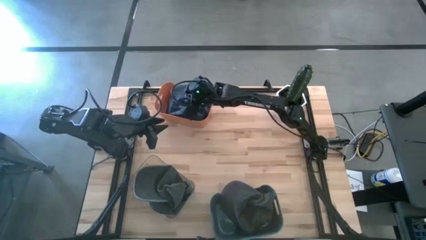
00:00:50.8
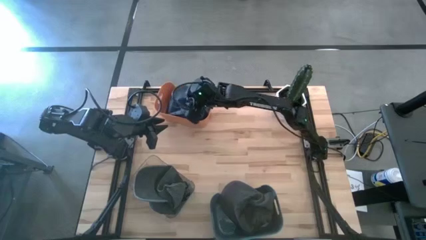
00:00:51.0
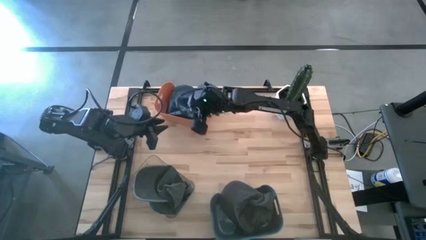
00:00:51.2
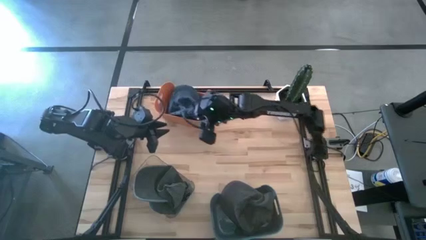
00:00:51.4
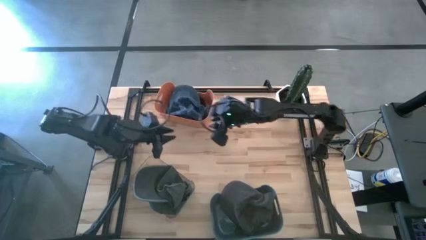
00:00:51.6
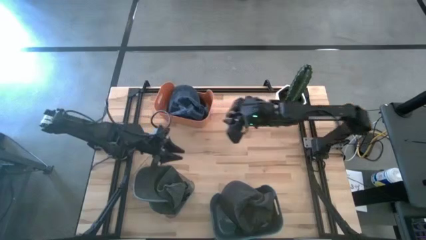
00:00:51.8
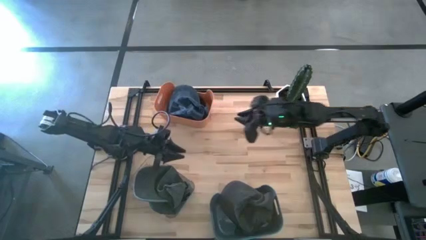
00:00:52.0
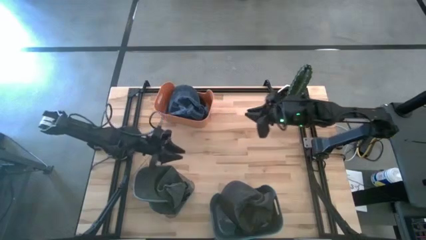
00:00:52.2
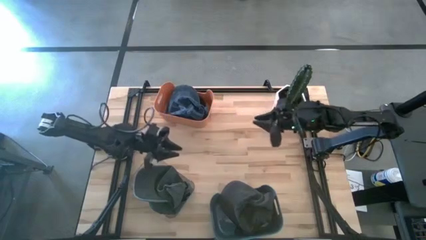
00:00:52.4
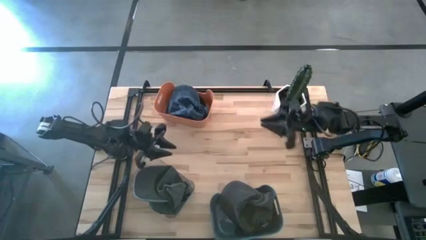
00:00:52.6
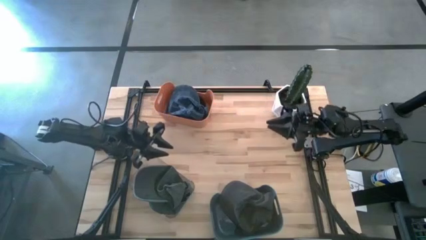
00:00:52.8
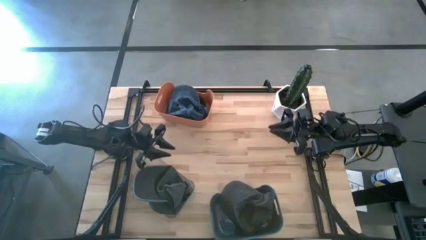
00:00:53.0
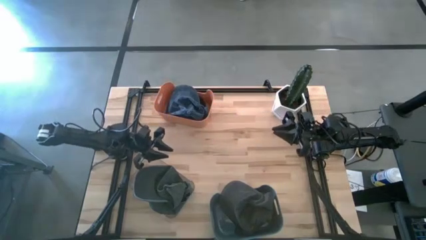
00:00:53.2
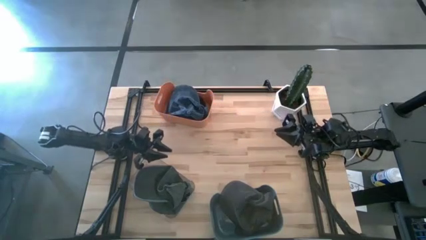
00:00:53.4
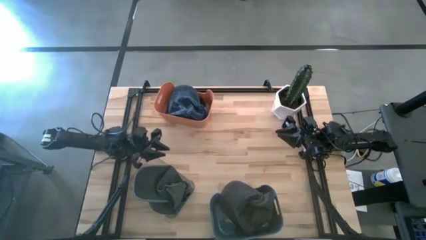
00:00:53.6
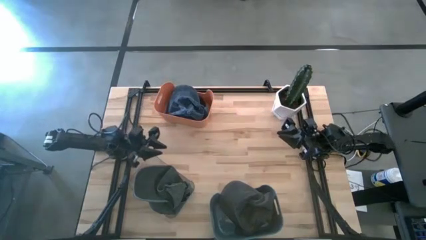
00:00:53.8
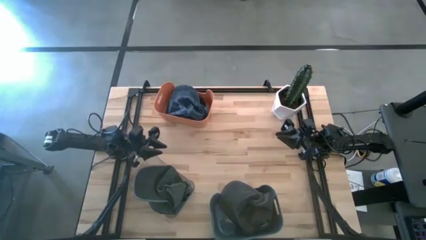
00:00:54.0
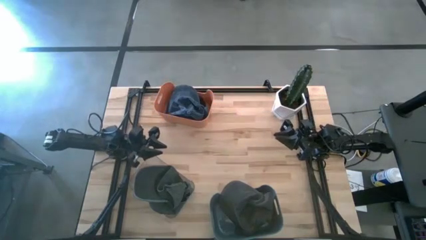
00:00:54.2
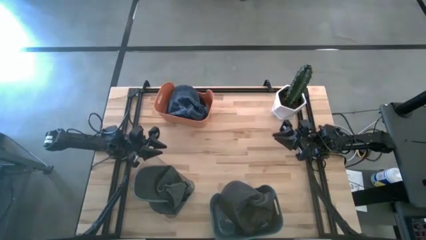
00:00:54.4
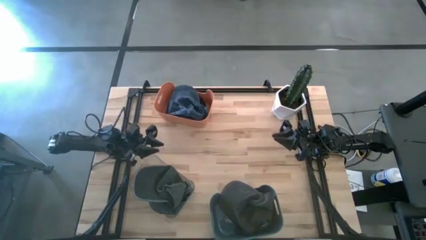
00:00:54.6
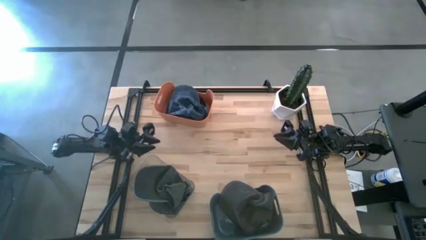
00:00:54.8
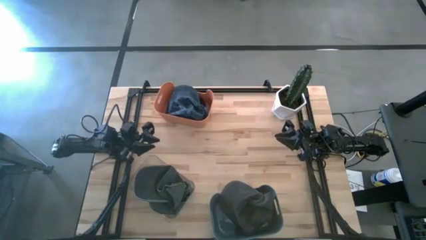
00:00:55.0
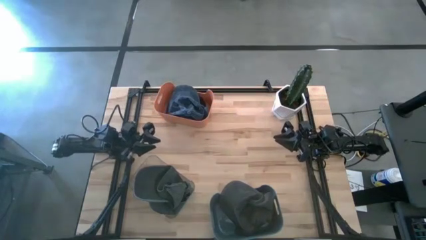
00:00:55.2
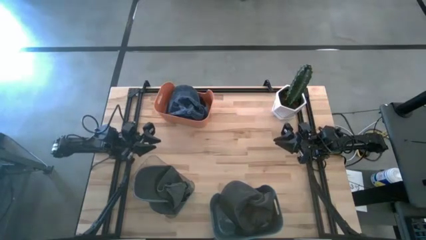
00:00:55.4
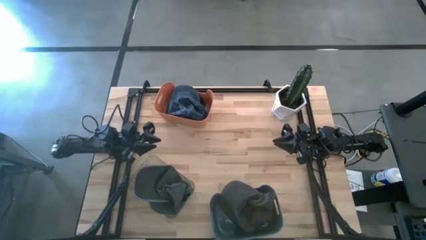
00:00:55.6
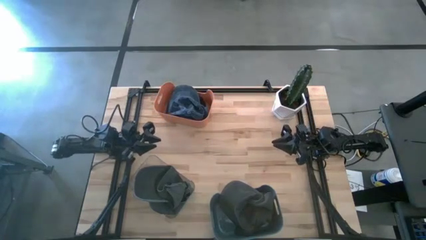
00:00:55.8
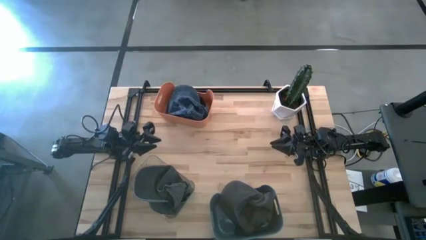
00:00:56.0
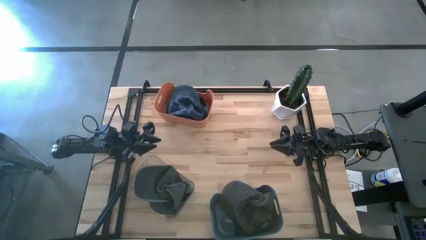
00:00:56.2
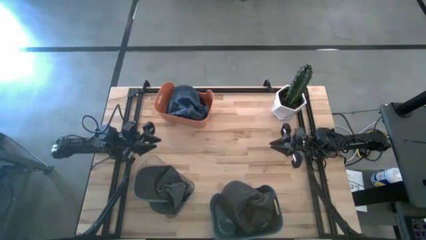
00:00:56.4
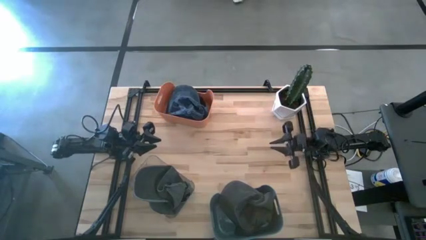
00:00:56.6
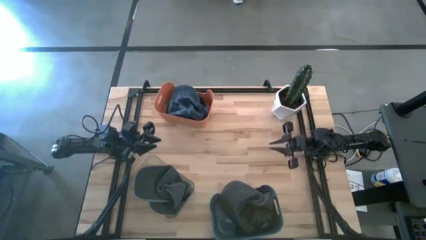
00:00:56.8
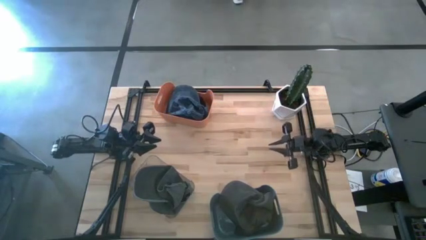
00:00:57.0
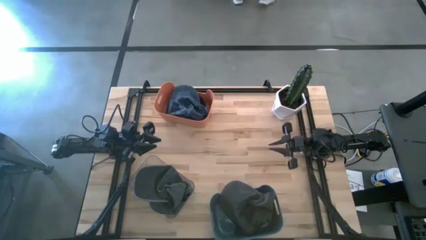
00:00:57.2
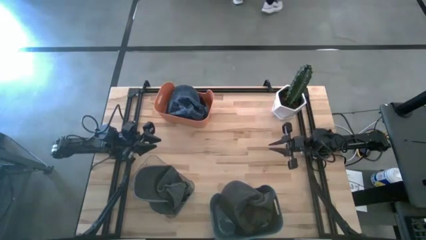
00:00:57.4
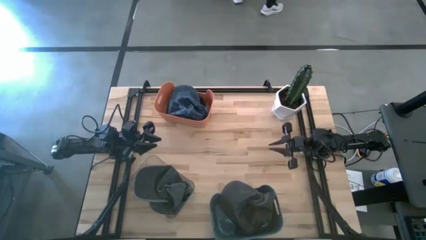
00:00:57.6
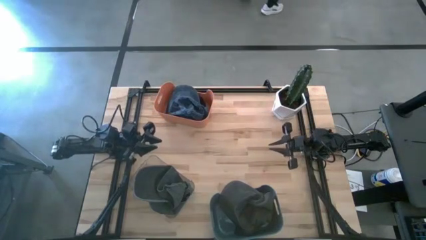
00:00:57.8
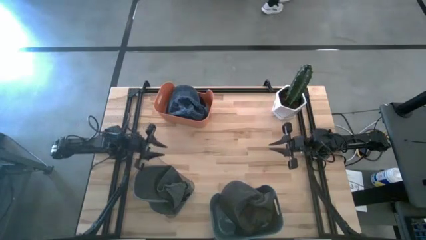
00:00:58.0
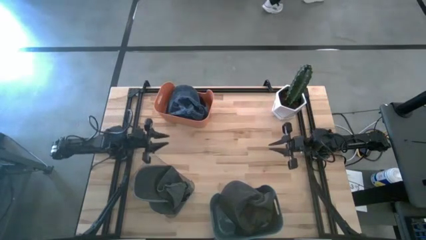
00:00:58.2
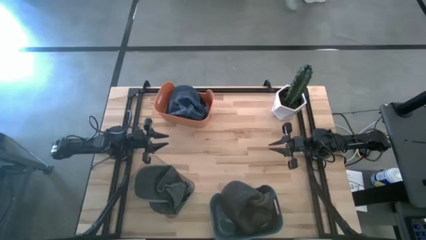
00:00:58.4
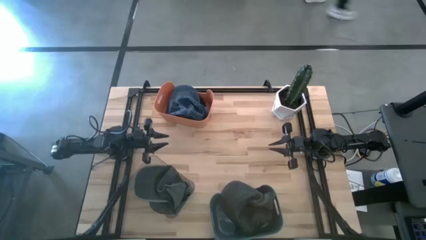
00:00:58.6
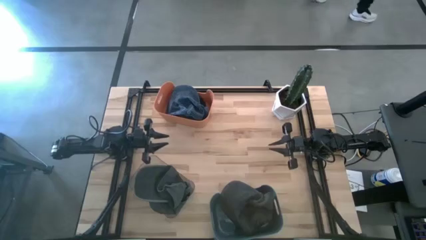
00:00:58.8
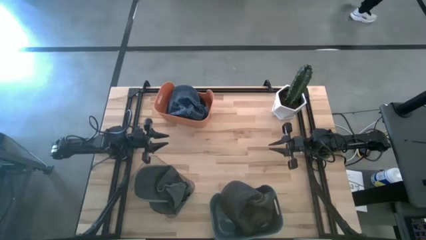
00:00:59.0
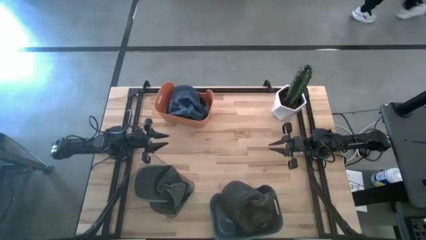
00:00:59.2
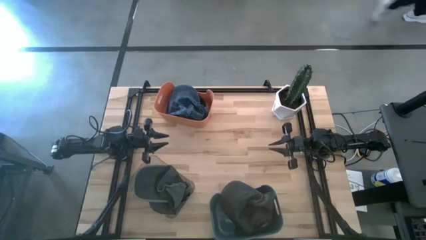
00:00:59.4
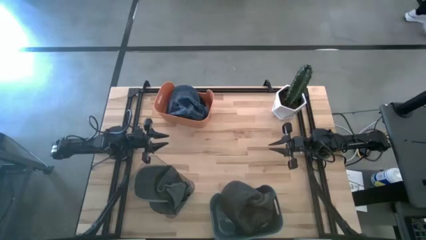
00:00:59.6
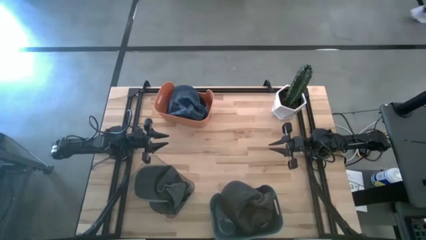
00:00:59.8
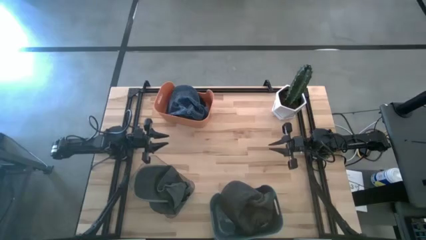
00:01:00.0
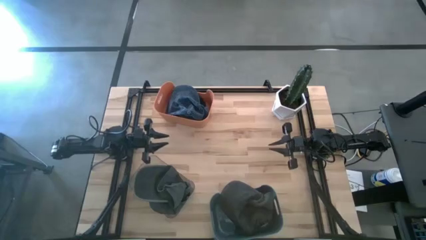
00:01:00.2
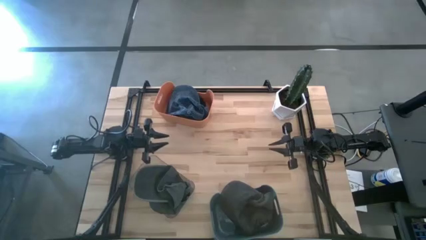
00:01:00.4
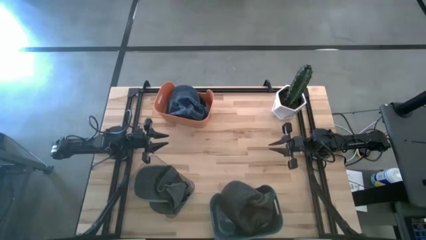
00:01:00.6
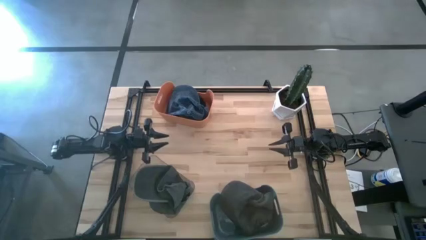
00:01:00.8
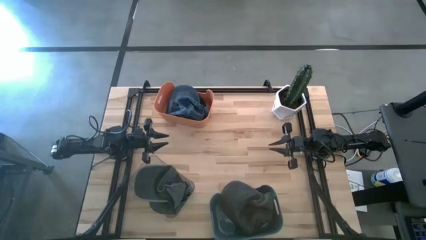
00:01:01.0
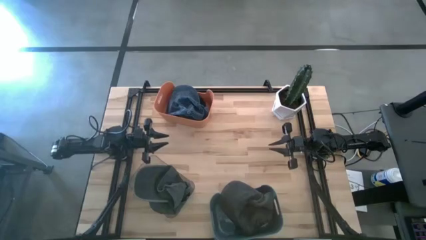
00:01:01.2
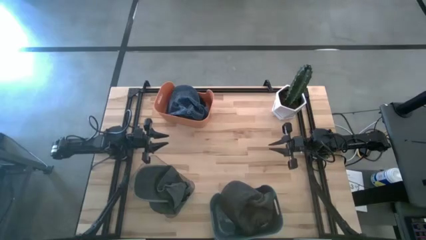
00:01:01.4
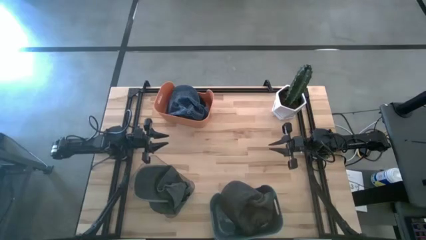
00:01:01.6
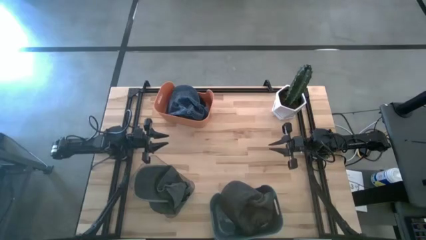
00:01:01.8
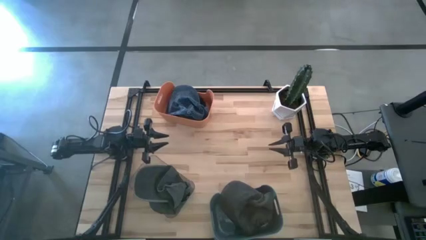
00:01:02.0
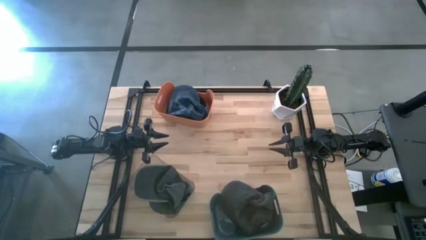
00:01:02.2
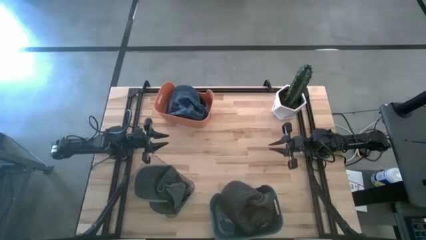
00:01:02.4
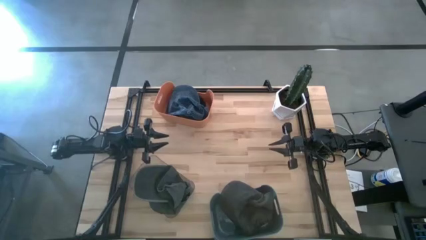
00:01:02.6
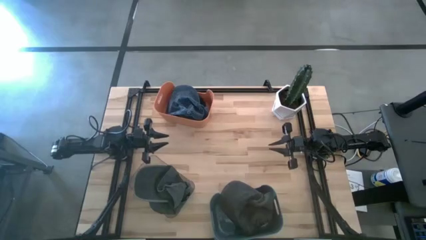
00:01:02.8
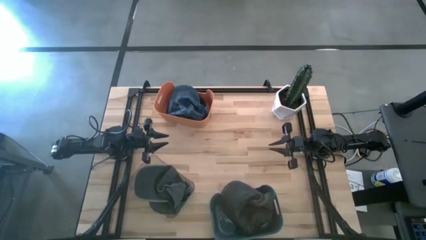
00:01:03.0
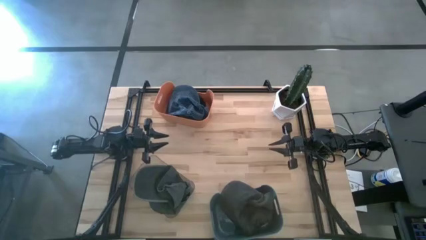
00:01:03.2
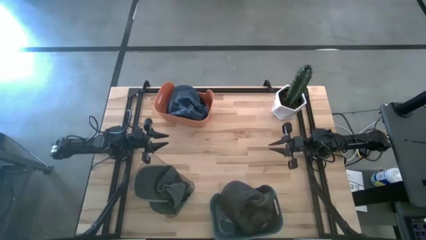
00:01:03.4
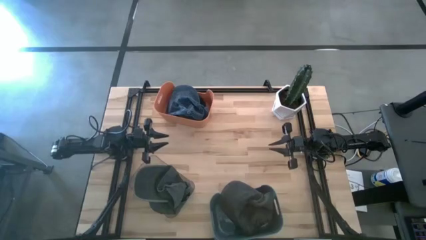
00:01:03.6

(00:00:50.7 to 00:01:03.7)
Task: Pick & Place hat
Return to Home Position
